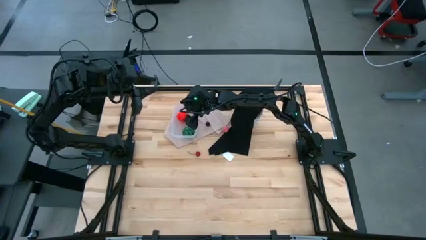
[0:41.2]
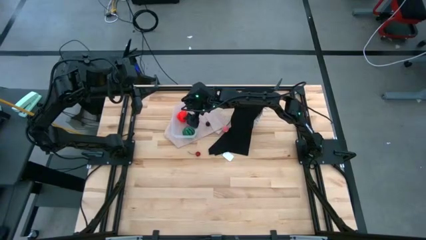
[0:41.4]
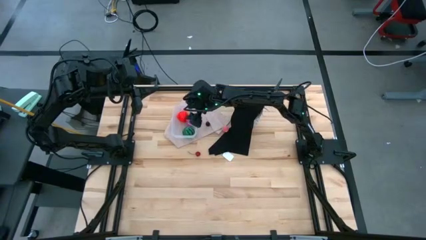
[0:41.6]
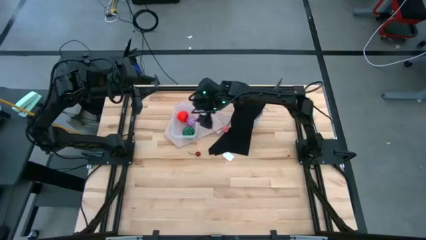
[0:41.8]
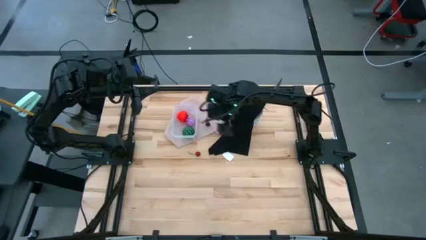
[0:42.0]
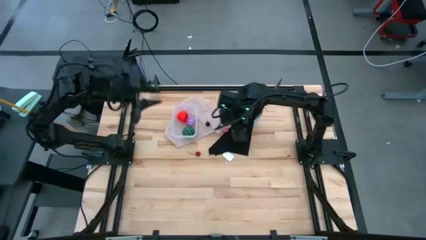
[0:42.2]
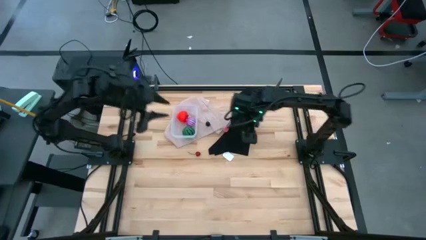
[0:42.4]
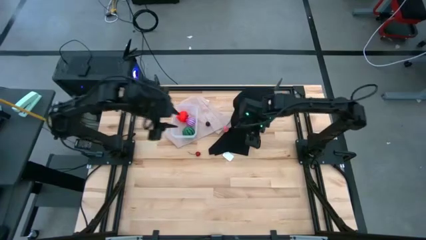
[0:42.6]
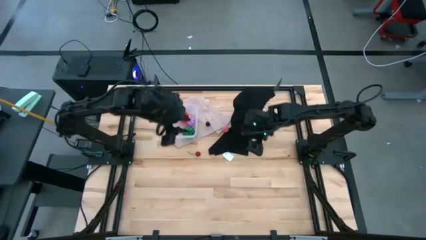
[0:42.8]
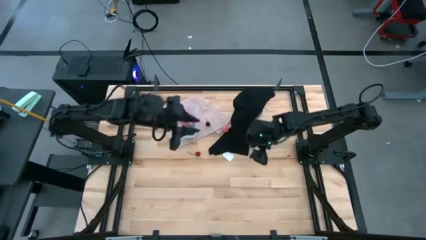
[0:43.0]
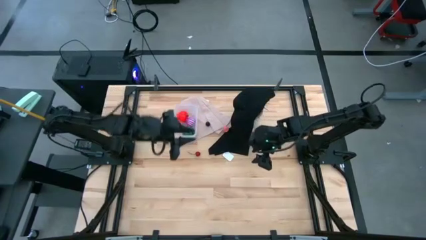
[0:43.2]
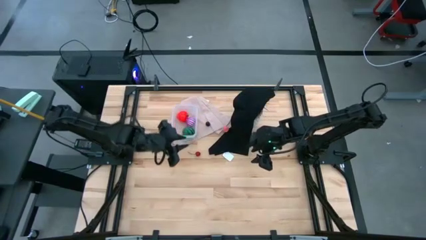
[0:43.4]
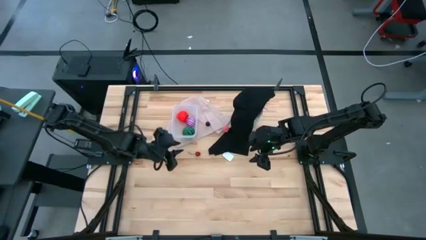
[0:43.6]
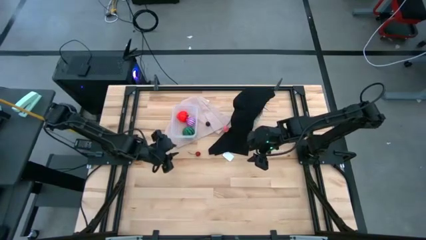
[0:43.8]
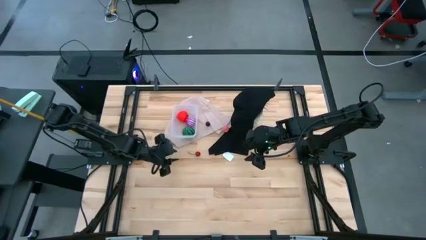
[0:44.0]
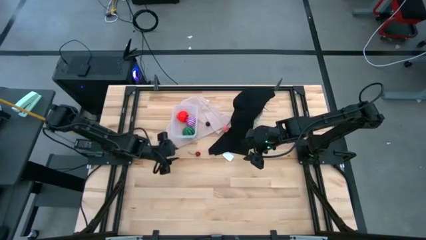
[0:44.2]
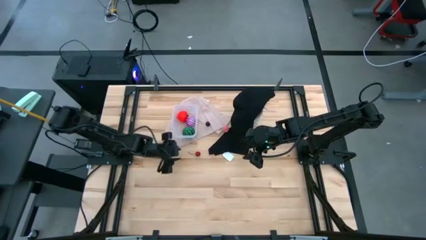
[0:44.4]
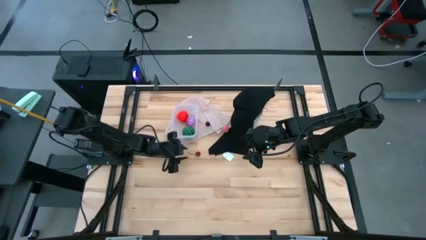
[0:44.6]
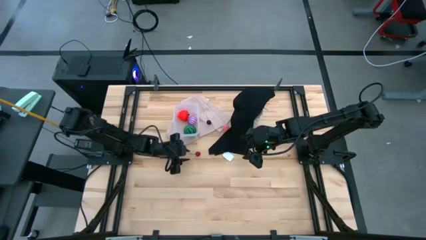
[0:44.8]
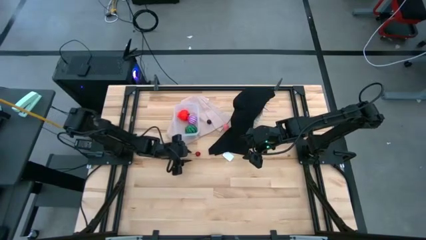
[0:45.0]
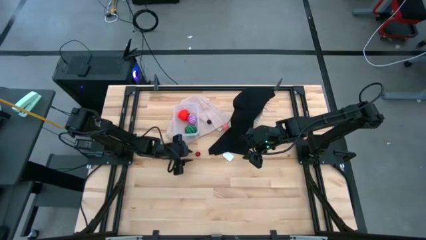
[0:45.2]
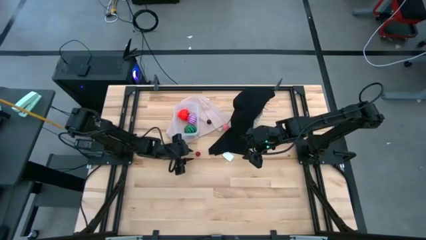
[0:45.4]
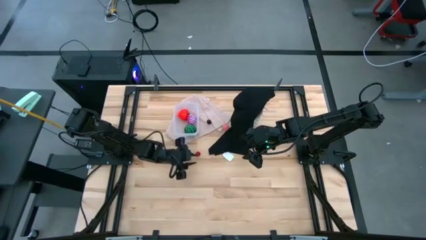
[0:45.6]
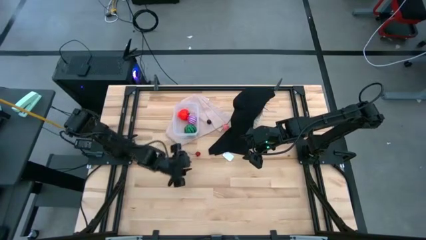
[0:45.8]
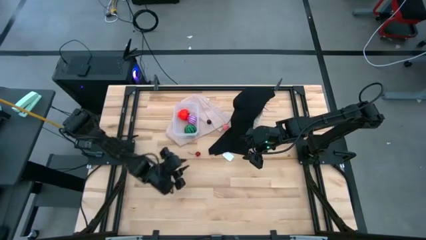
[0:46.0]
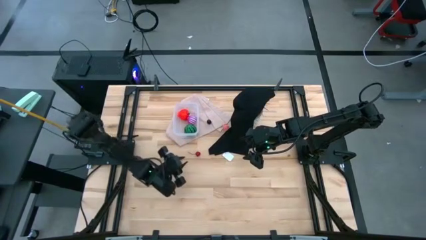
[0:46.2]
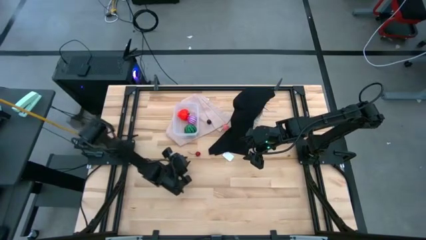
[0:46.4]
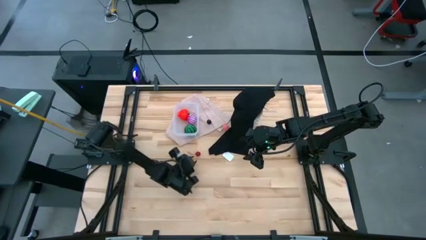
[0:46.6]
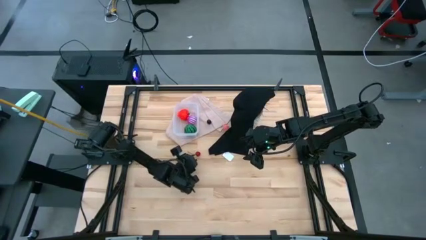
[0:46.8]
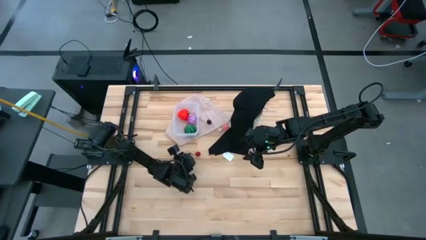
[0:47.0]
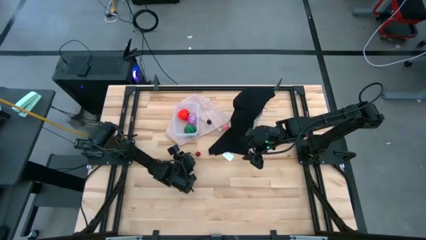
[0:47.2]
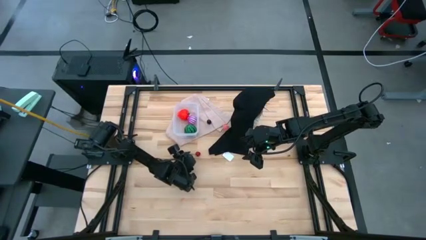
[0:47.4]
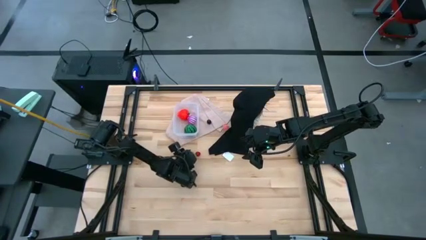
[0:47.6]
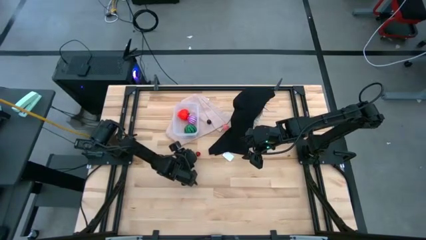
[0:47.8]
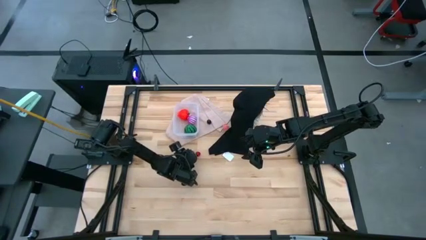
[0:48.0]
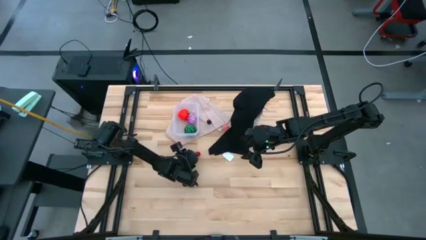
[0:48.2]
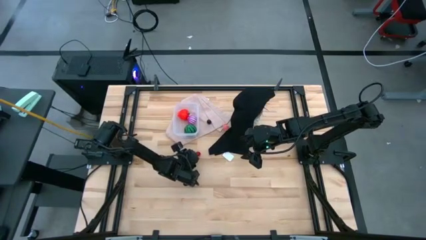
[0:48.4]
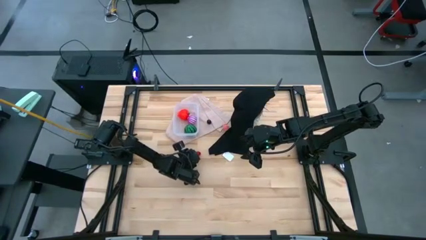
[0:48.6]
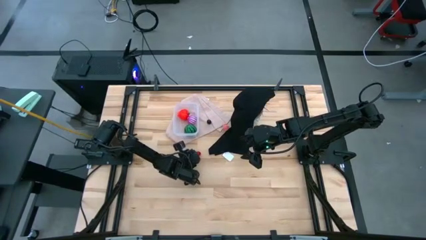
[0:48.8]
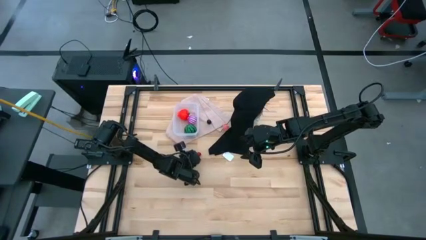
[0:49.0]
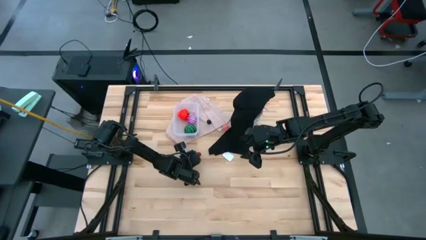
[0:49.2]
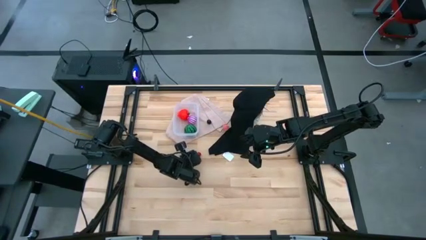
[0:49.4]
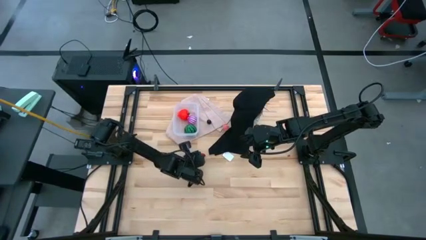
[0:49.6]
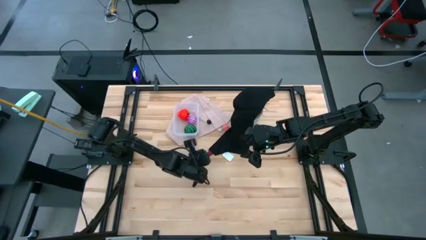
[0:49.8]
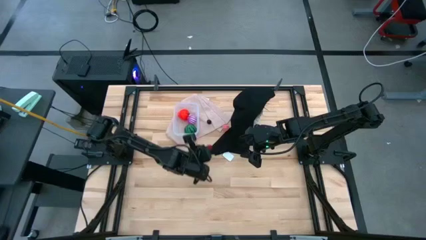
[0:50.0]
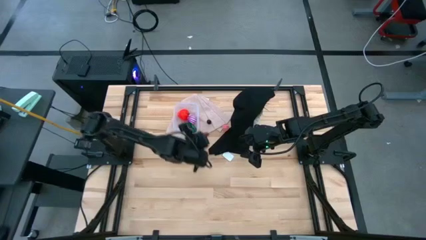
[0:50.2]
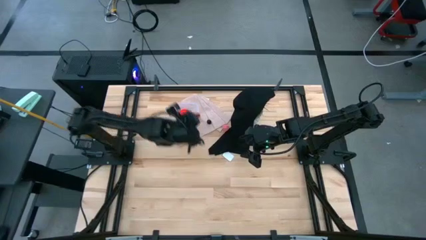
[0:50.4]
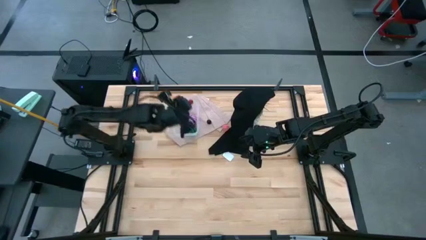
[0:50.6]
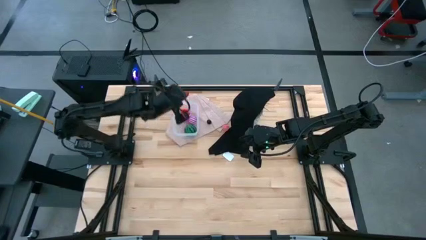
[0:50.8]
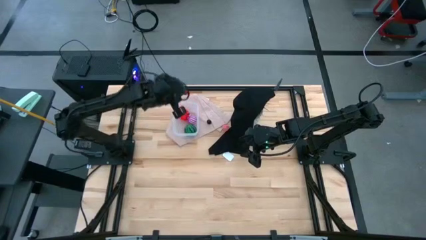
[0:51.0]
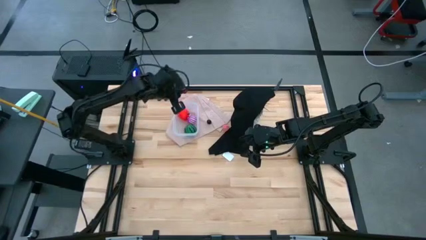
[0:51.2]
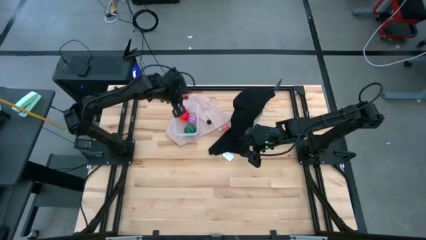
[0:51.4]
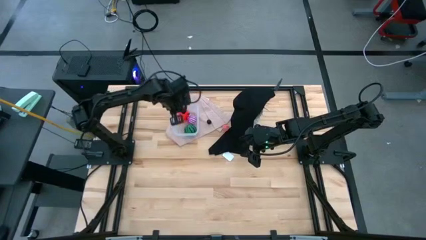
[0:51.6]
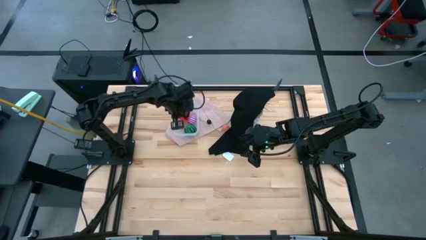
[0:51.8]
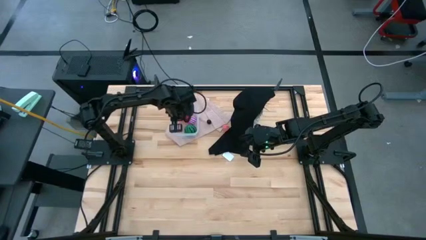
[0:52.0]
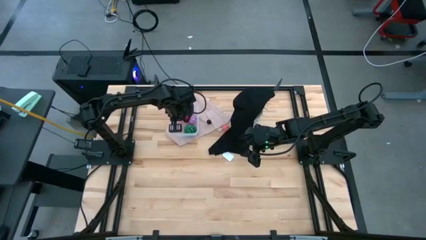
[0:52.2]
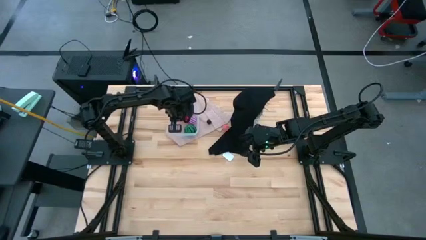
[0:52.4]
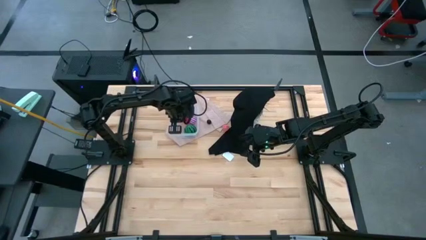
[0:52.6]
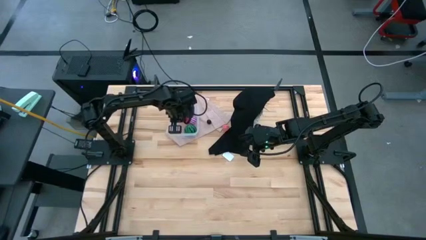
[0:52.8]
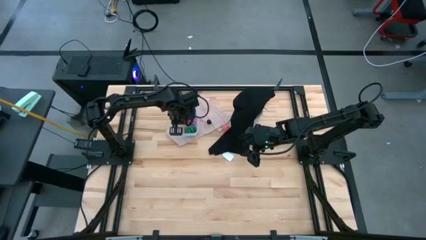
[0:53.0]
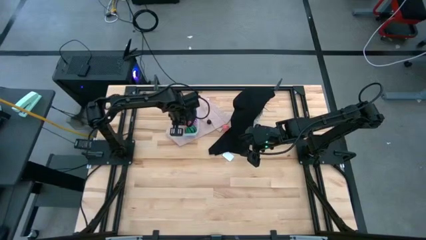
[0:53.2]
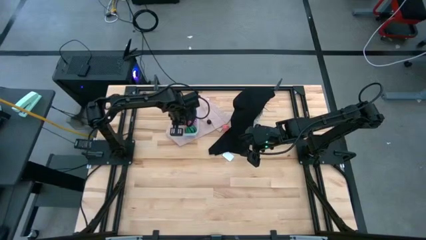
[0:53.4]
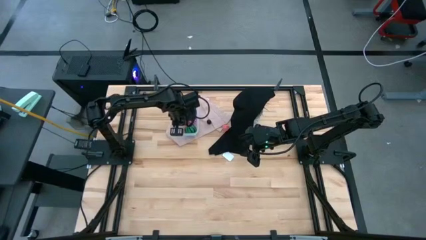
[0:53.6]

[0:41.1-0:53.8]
Task: Pick and placing Produce into tupperware
Put the red cherry into the transparent bin
